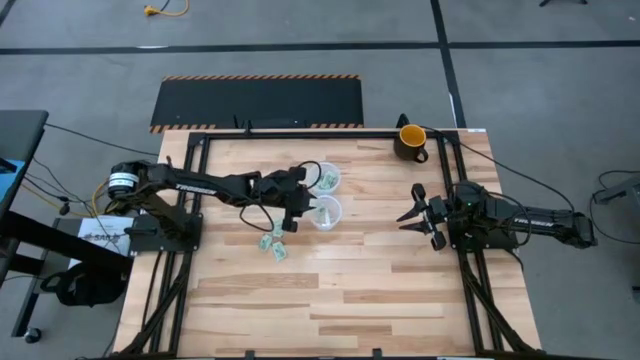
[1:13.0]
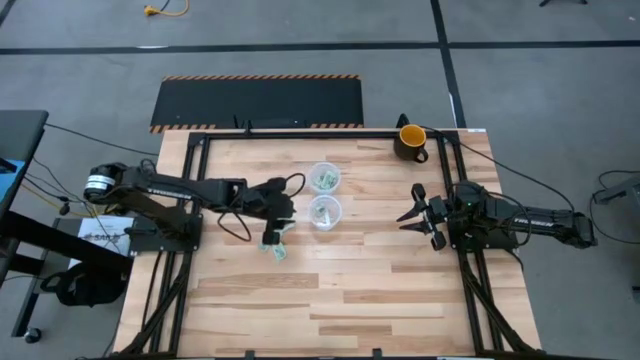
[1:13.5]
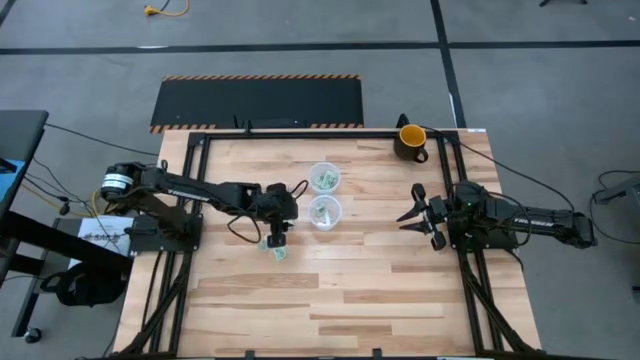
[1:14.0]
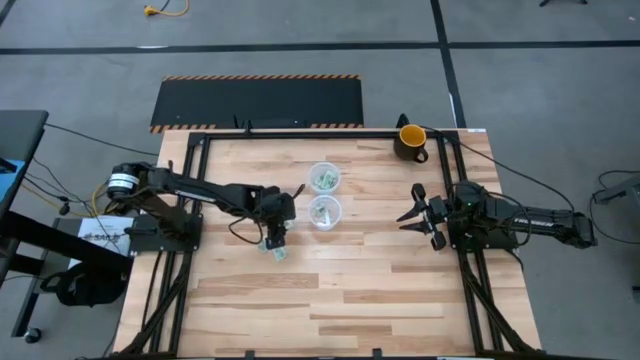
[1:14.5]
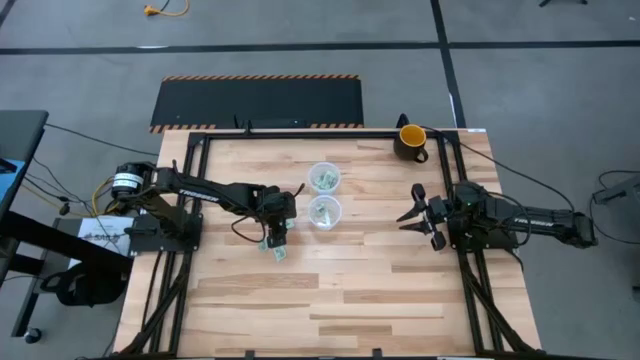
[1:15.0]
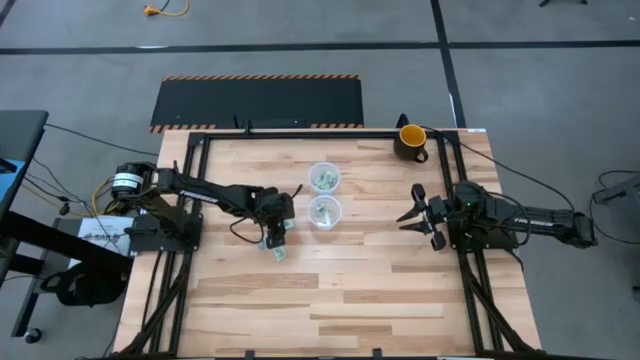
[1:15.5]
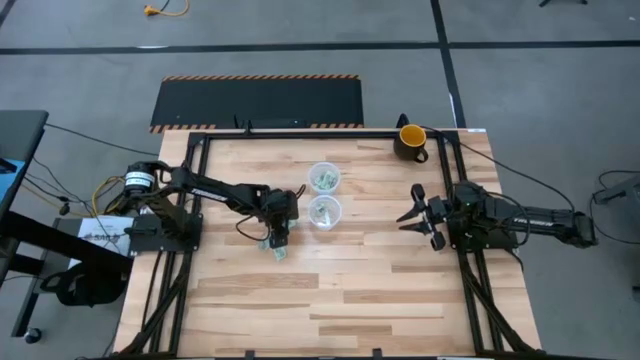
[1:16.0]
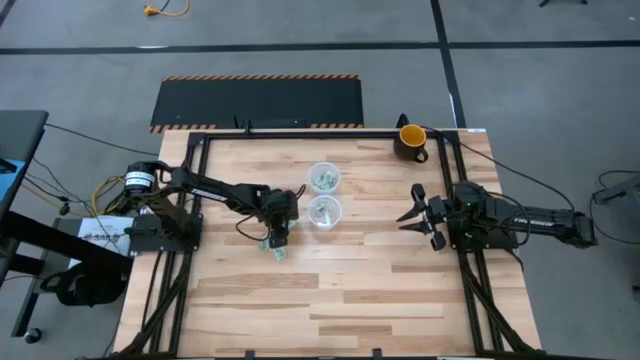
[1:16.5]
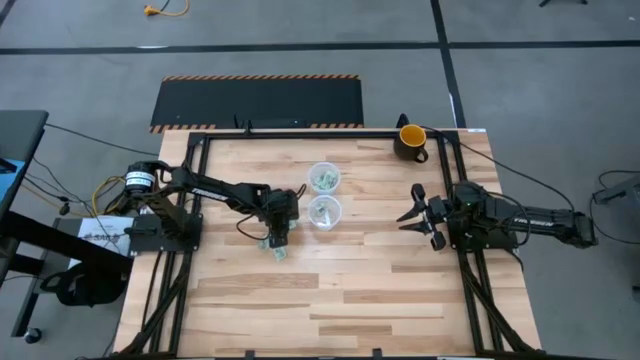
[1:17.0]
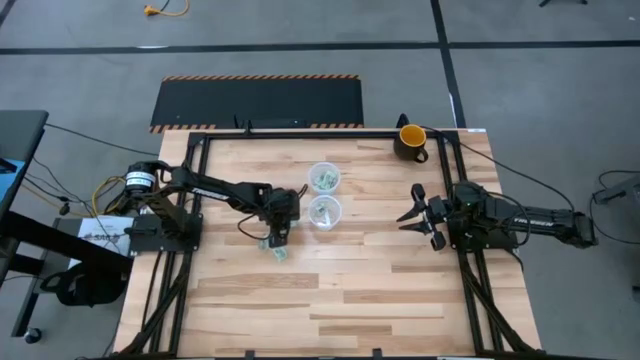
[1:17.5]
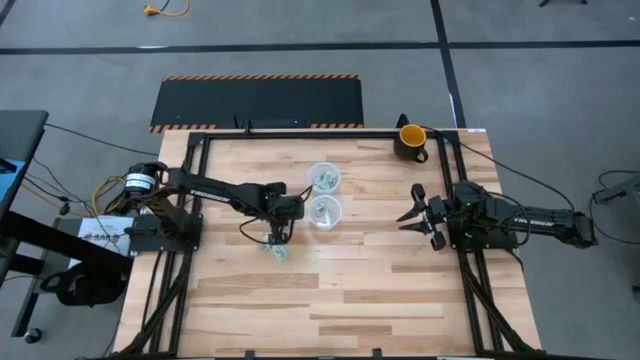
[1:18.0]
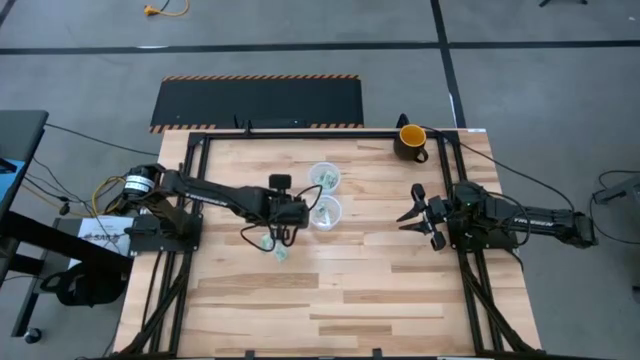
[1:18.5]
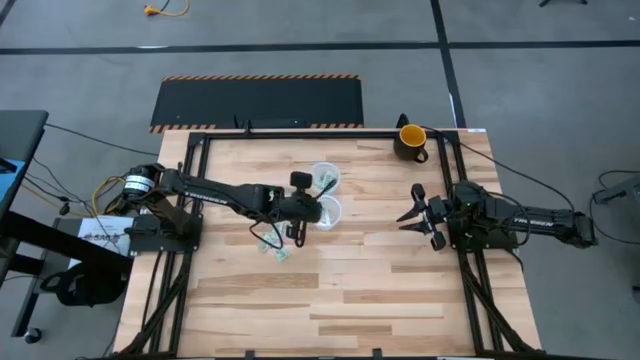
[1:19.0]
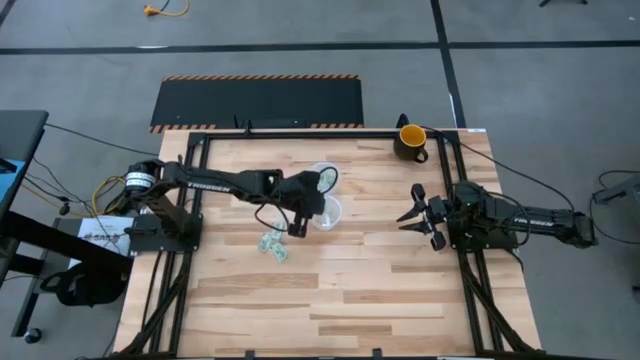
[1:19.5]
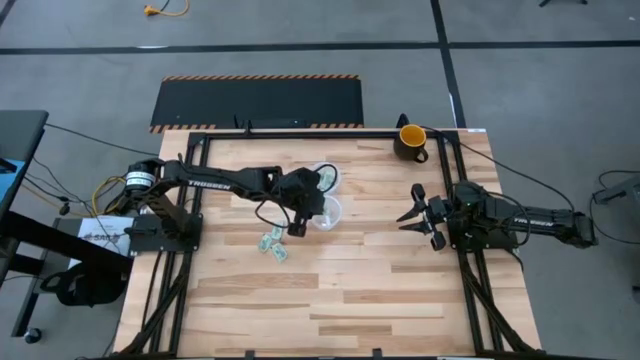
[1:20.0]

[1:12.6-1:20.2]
Task: Pick and place items into bin
Put the green stevia packet into the bottom transparent bin

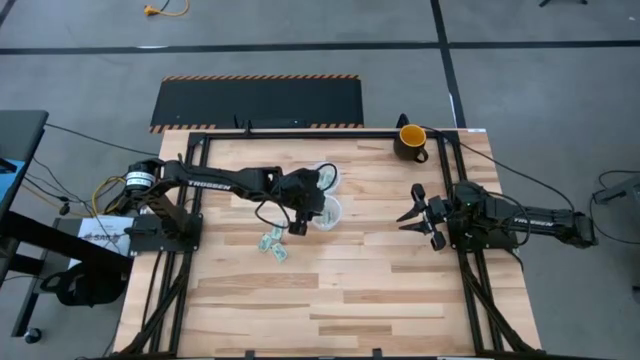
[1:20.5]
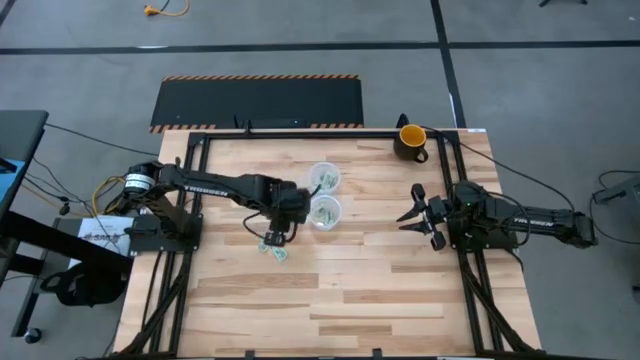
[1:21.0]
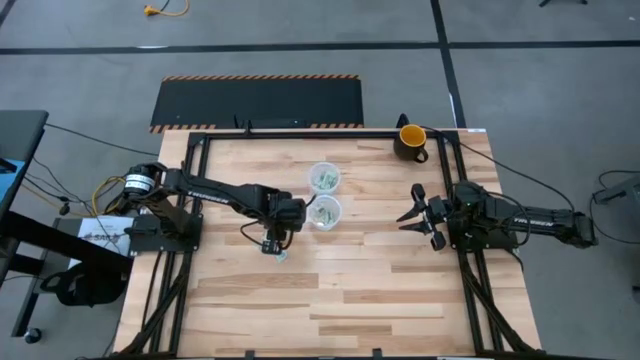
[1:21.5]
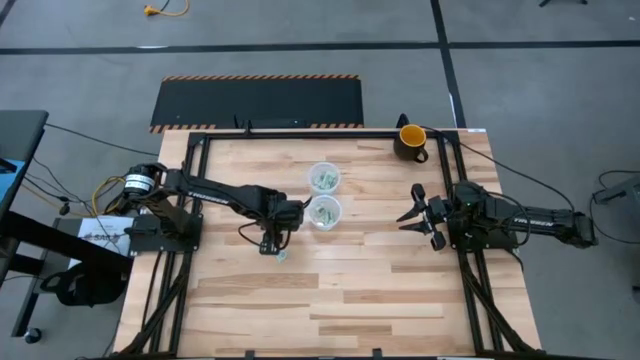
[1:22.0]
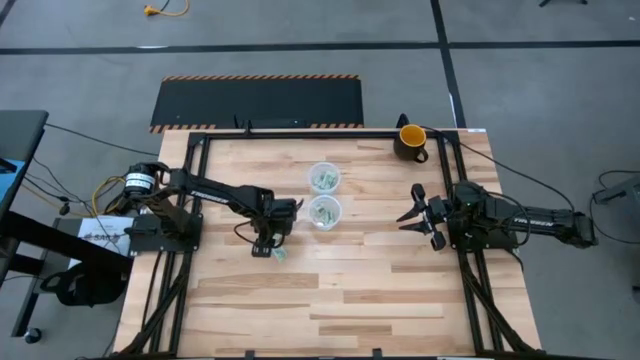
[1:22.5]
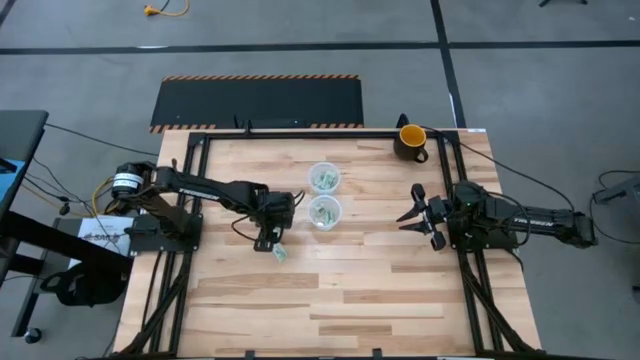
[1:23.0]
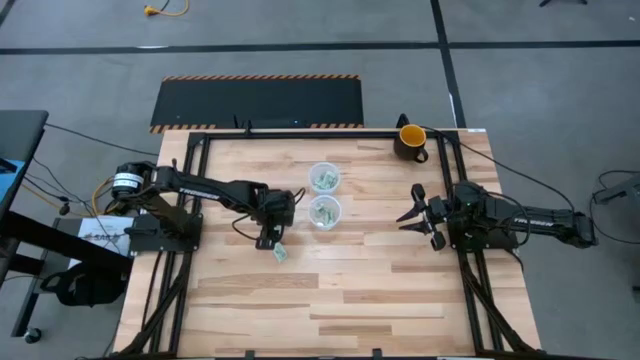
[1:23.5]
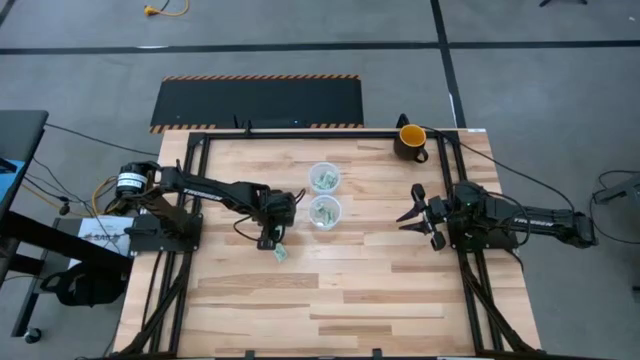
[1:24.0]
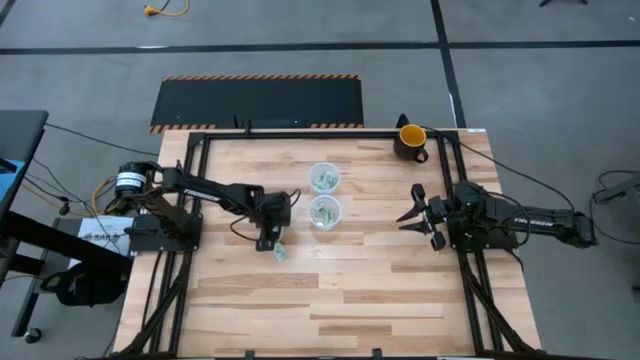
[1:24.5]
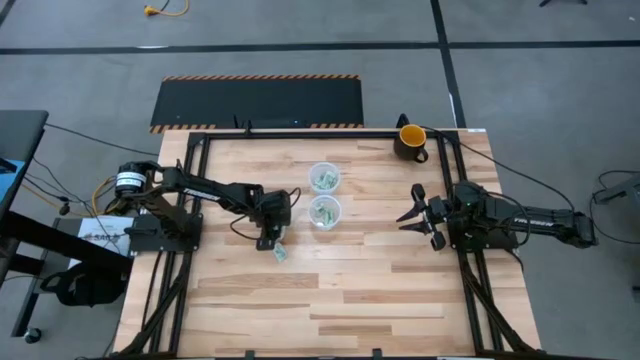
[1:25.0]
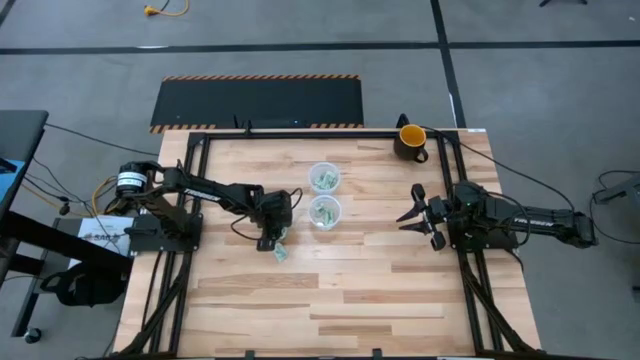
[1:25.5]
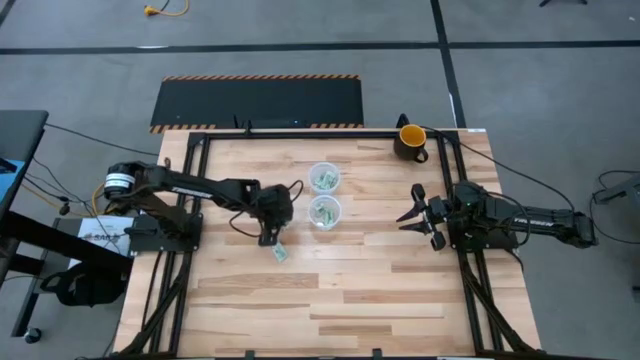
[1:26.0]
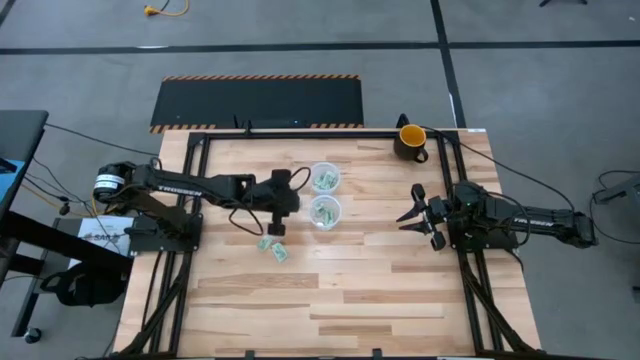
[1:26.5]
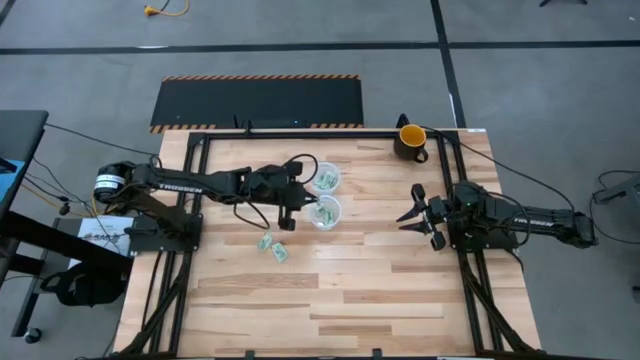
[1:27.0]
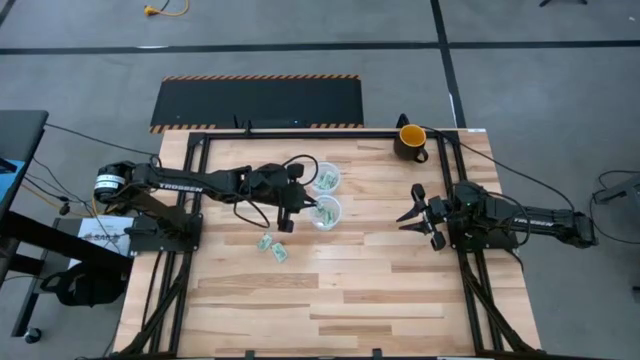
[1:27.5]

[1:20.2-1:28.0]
Put the green stevia packet into the bottom transparent bin

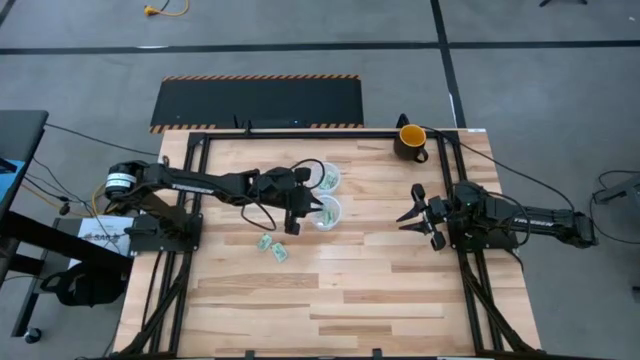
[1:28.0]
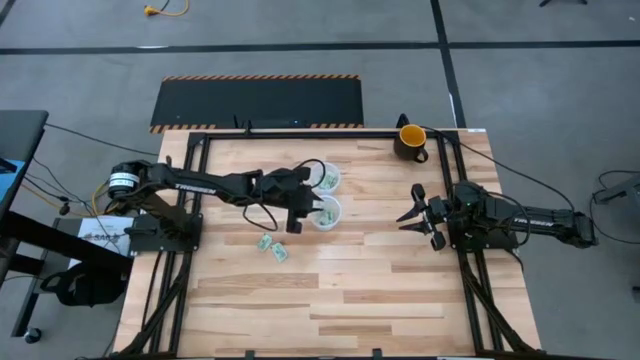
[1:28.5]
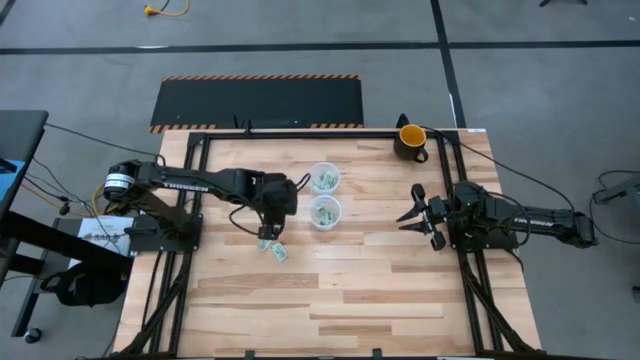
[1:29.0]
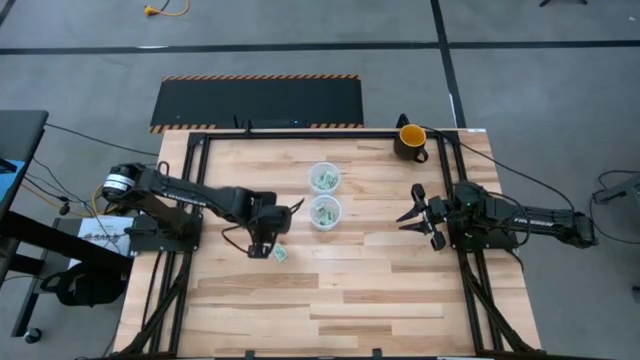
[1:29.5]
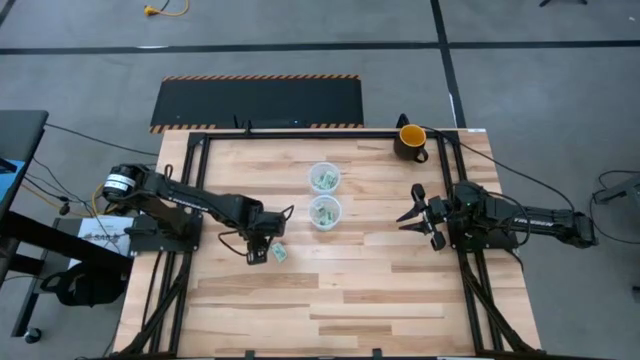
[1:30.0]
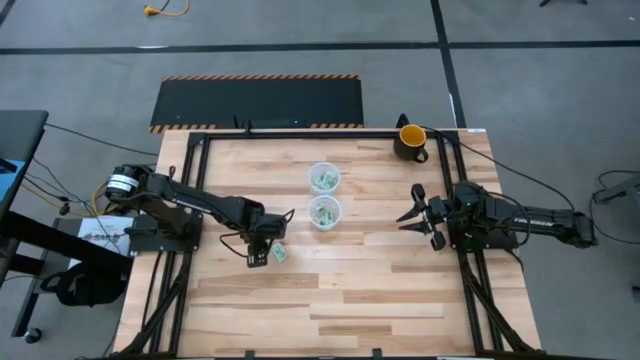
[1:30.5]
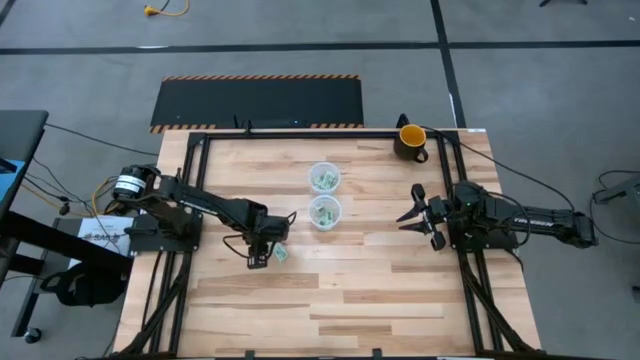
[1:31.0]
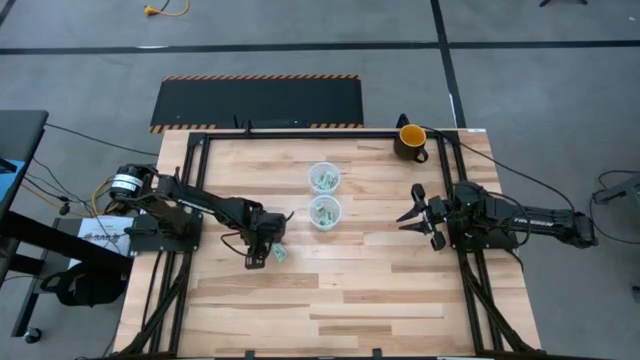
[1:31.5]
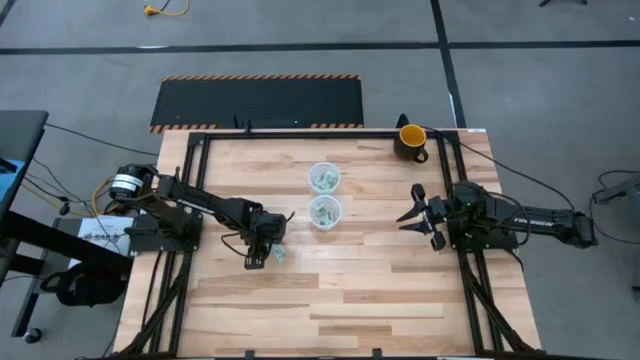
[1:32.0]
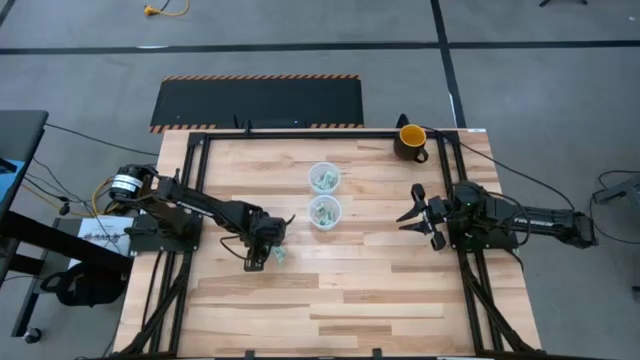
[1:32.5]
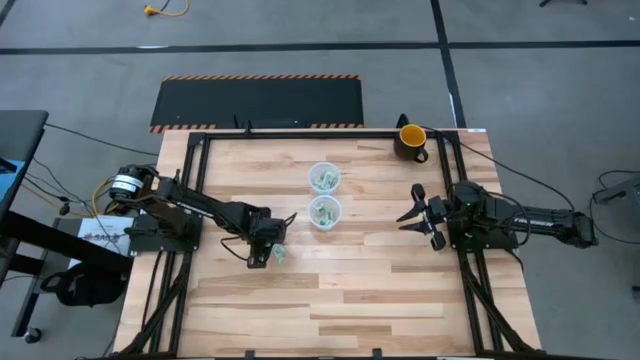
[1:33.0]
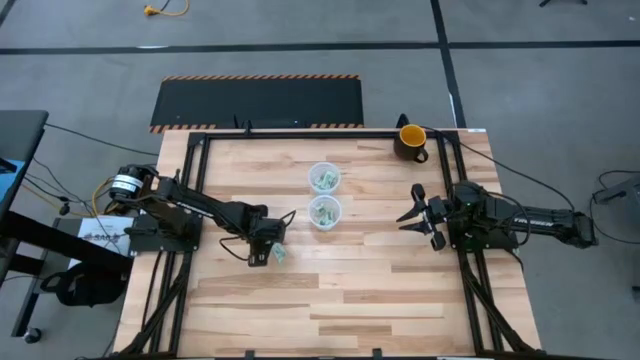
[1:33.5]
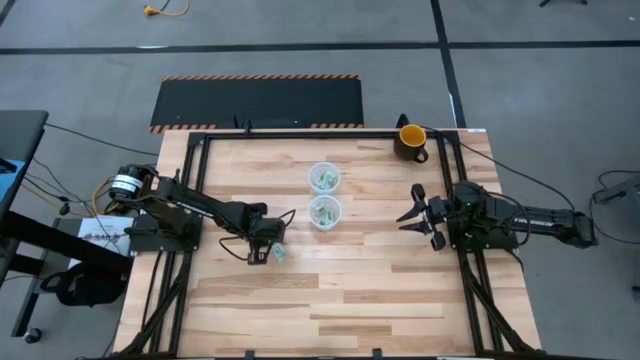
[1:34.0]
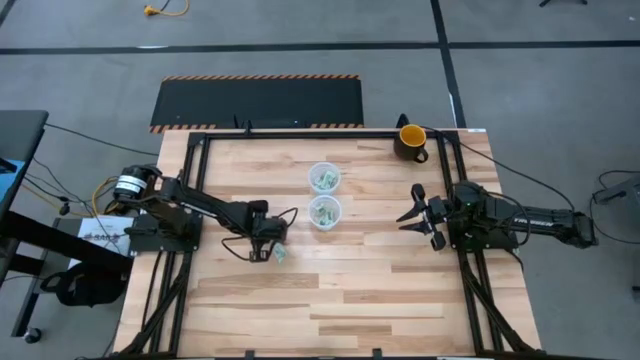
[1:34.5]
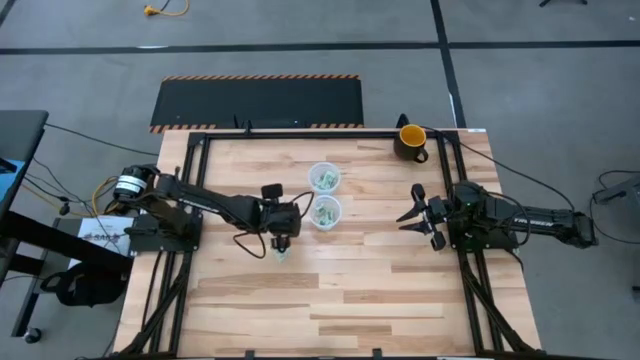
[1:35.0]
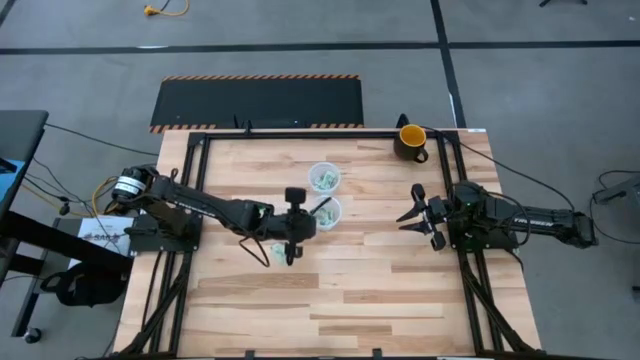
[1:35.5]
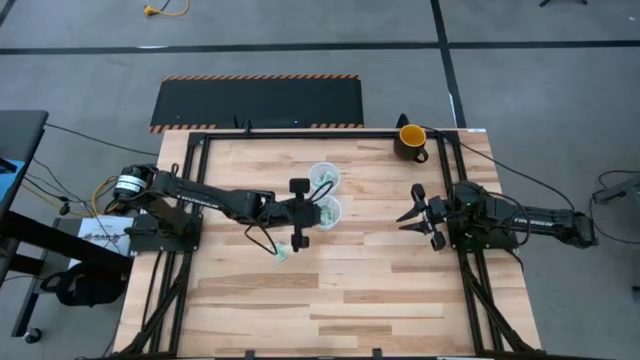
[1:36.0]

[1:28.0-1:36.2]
Put the green stevia packet into the bottom transparent bin
